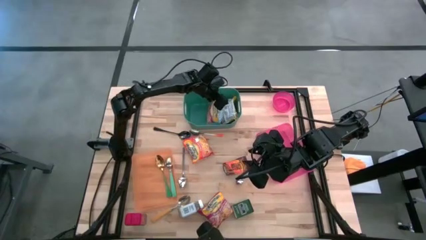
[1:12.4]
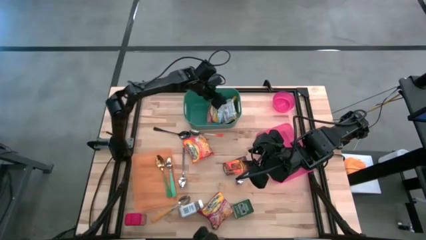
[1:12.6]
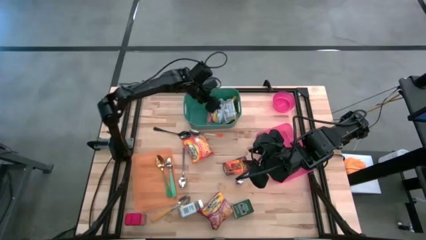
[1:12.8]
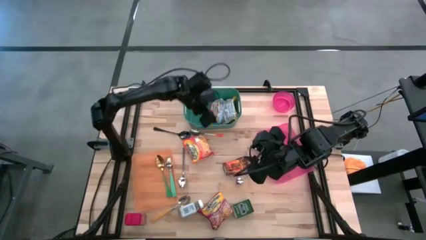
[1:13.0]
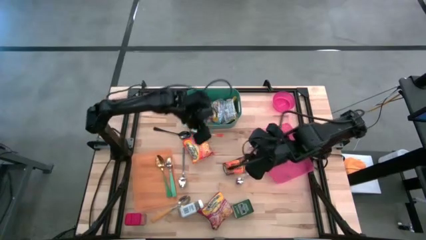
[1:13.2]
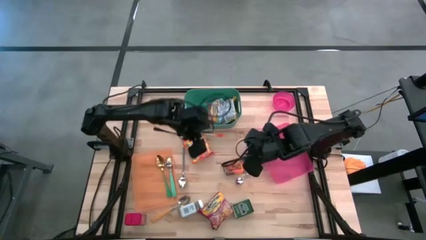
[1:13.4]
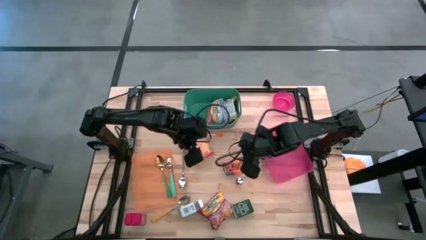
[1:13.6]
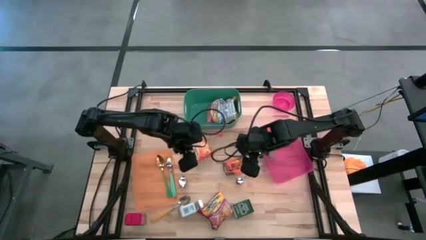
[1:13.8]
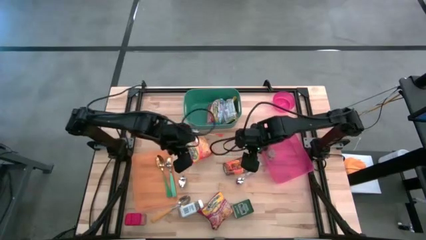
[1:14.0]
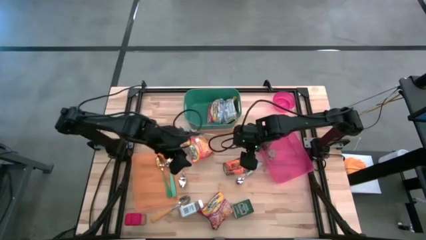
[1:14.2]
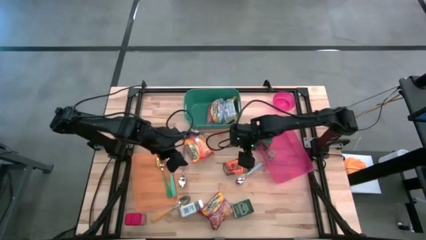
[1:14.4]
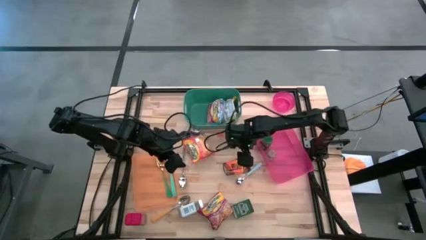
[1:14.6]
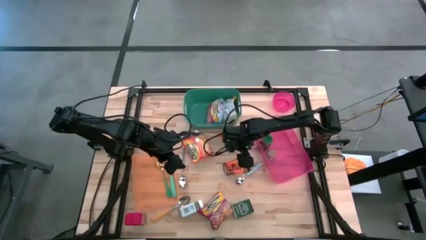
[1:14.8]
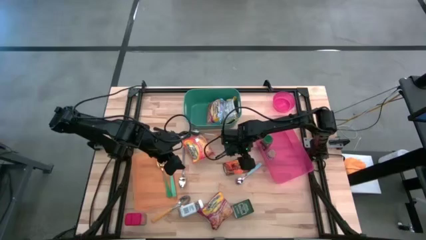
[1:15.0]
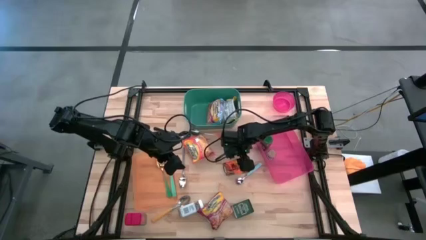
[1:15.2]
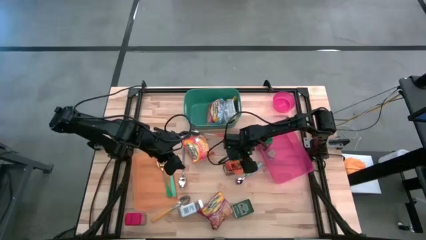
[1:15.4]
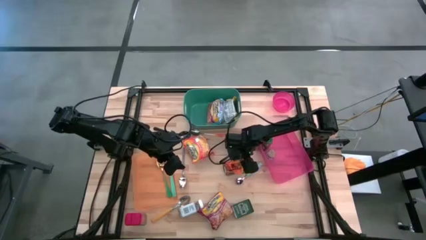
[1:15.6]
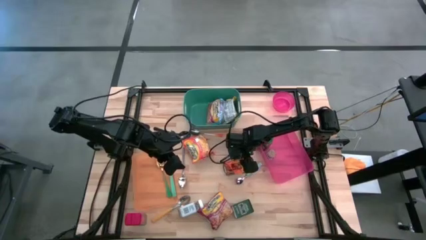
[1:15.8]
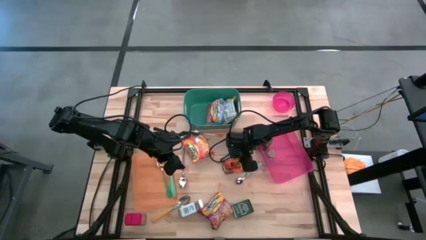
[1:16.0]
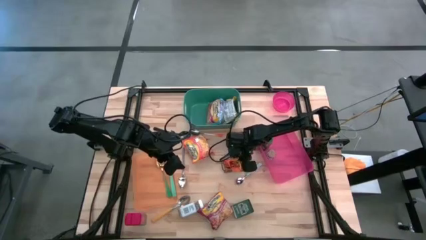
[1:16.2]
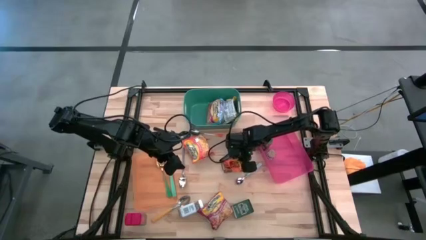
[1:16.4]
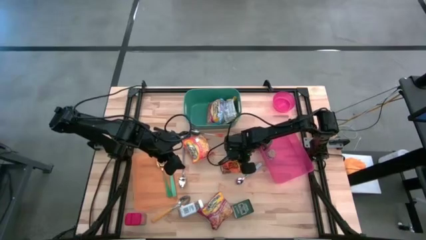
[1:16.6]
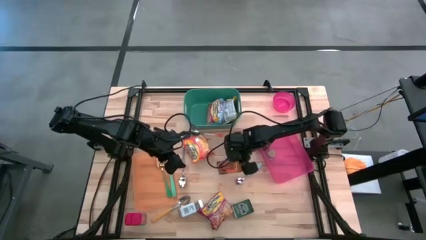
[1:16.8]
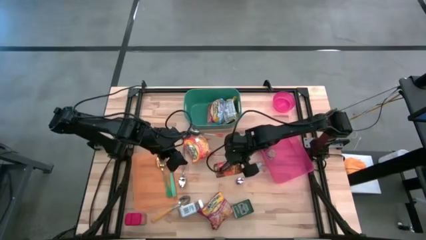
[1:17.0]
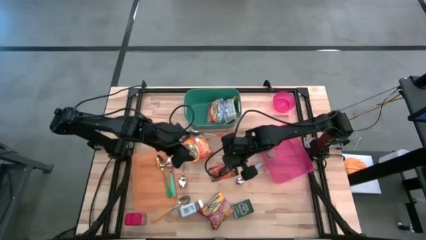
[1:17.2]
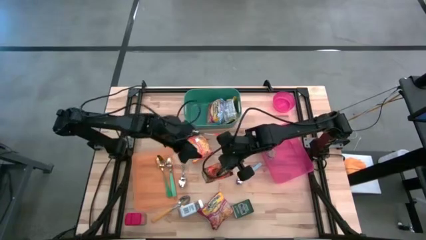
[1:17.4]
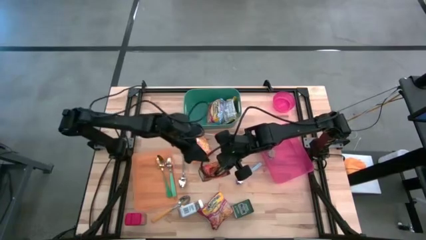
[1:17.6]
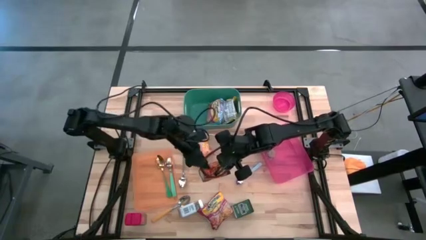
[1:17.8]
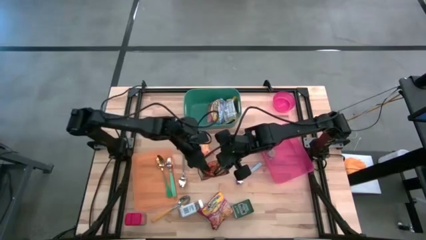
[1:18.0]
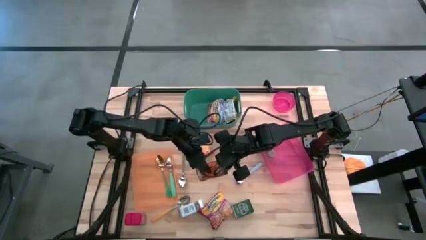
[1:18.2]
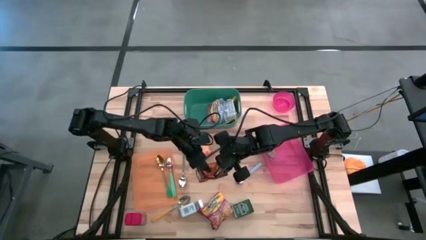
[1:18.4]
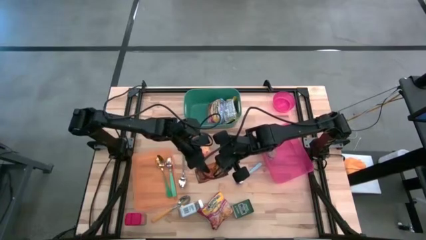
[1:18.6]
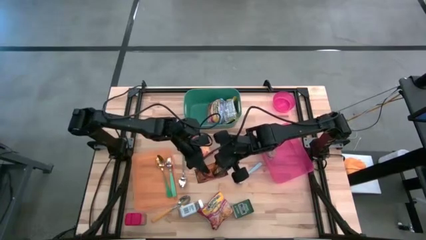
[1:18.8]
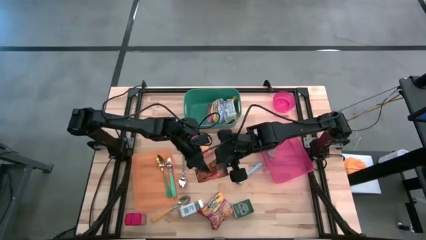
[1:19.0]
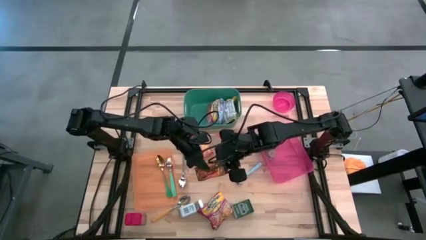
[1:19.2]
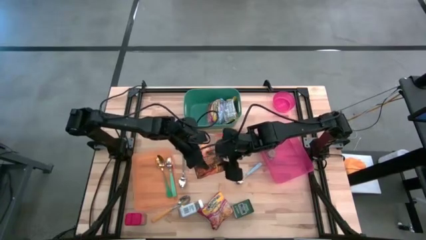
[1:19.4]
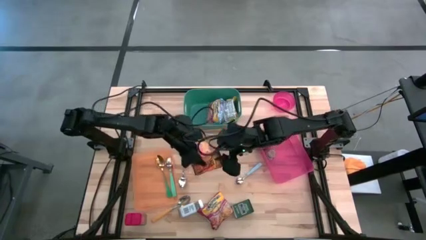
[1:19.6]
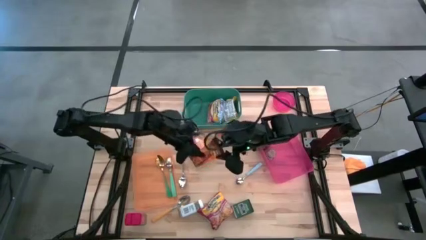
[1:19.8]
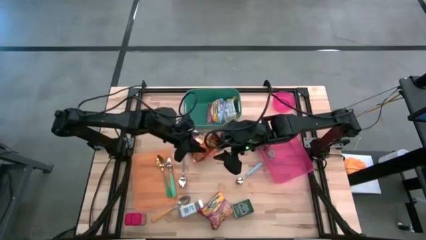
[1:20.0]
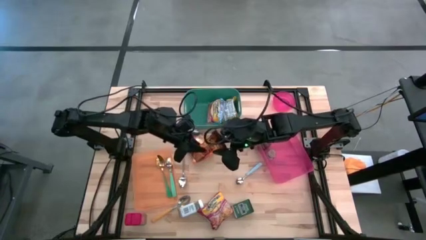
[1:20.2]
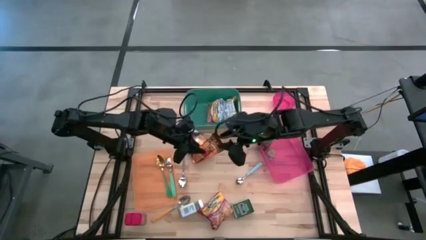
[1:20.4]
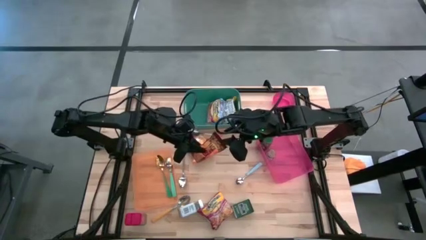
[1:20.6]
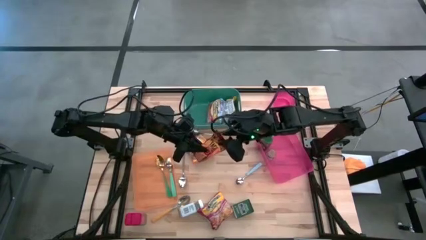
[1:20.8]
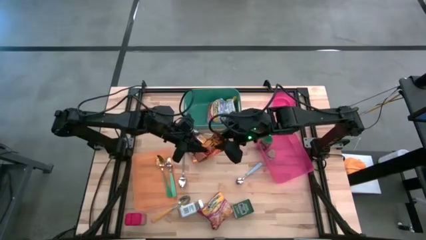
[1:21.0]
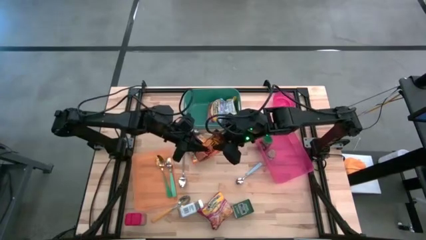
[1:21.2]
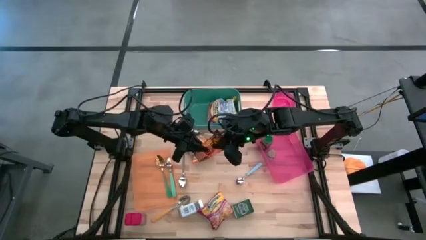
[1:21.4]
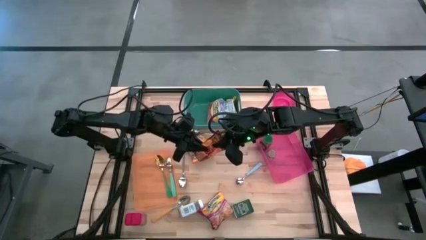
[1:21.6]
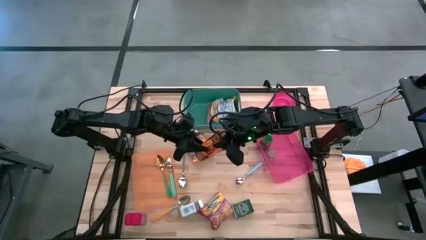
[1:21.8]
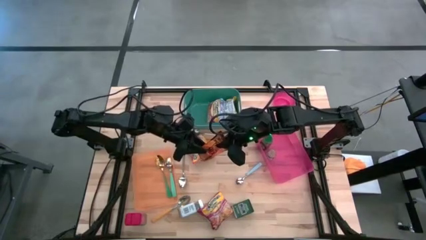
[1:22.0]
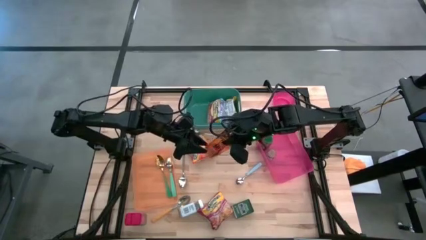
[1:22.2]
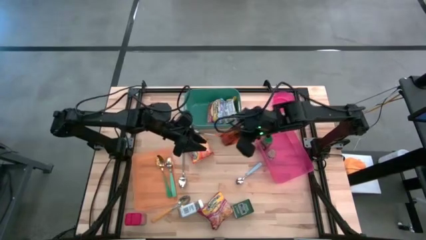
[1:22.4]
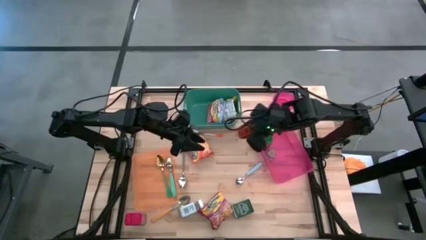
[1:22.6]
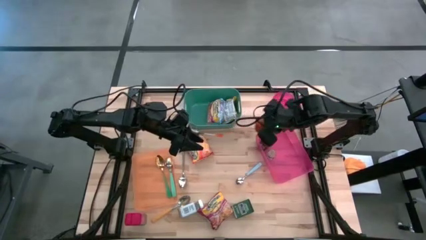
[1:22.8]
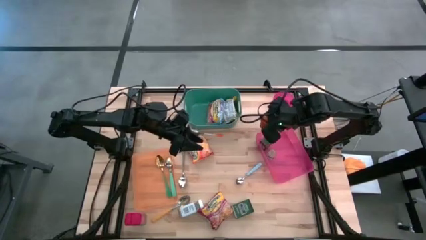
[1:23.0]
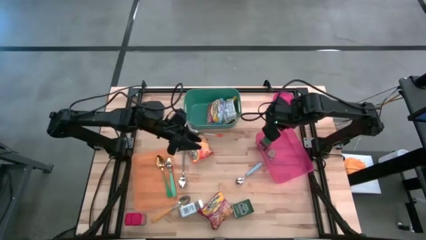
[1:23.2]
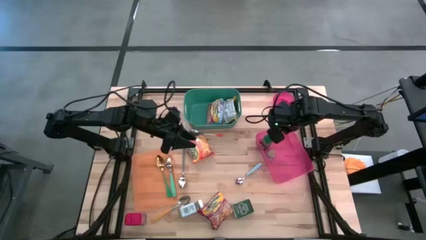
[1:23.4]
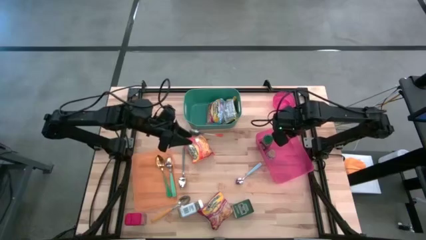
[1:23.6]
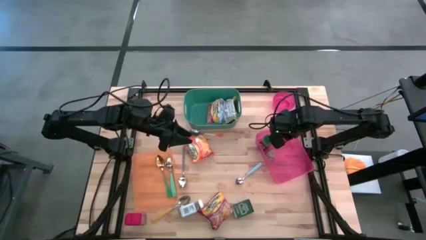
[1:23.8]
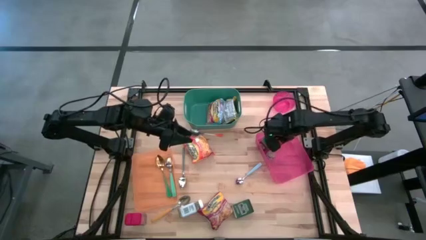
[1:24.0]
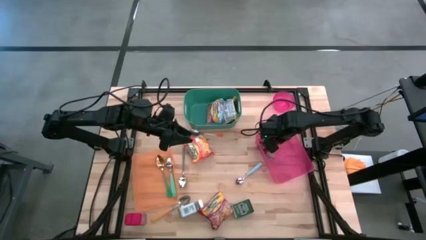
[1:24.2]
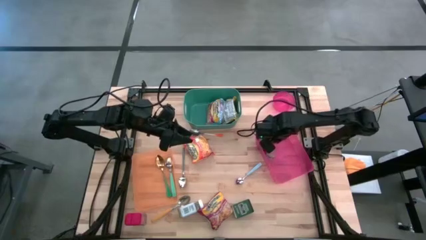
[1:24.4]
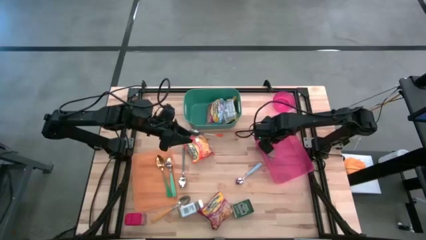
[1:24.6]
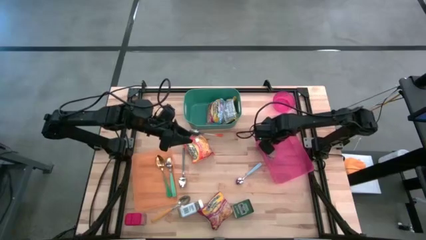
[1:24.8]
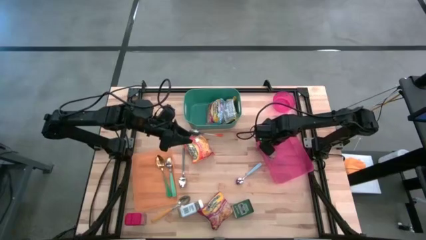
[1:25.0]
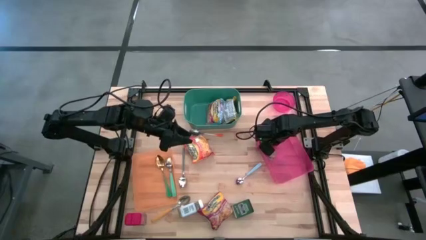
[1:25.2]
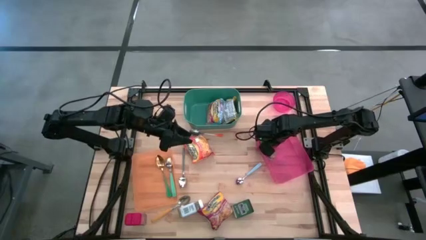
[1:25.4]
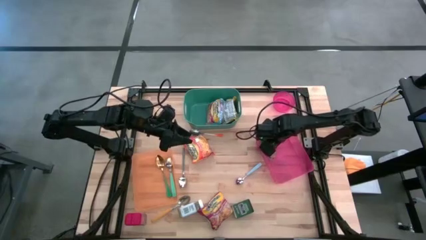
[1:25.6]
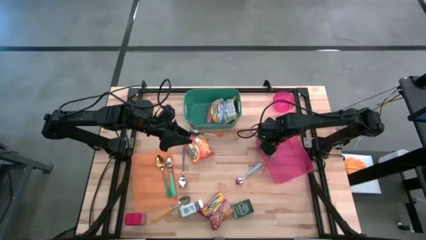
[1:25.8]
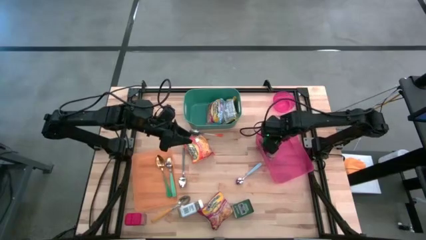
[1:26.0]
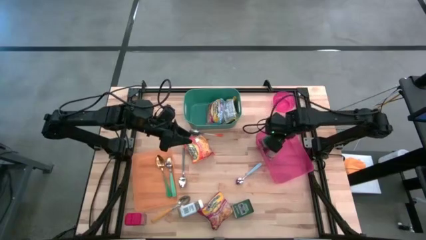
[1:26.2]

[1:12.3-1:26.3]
Put the orange spice pack into the pink bin
